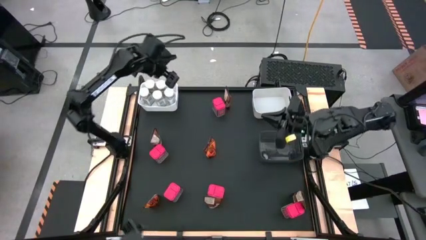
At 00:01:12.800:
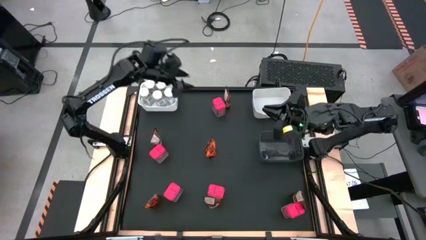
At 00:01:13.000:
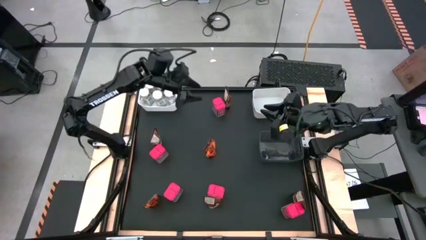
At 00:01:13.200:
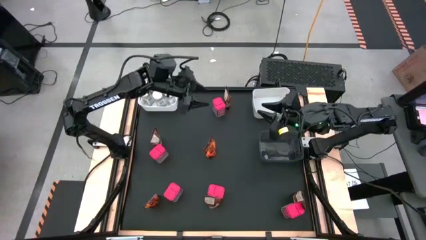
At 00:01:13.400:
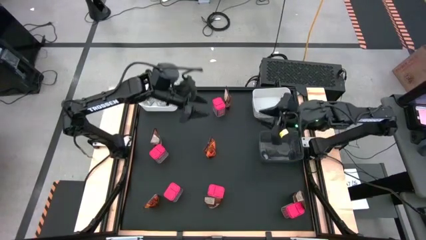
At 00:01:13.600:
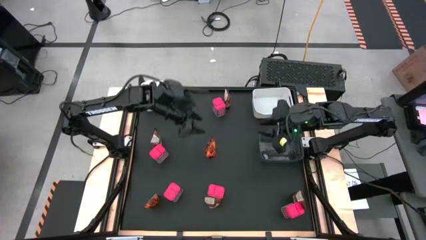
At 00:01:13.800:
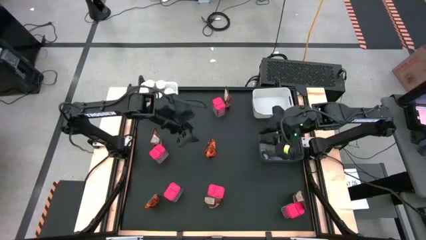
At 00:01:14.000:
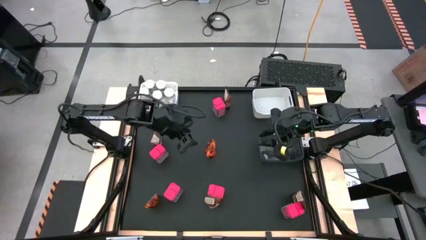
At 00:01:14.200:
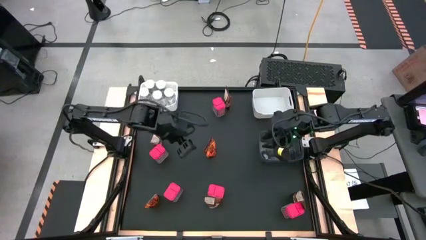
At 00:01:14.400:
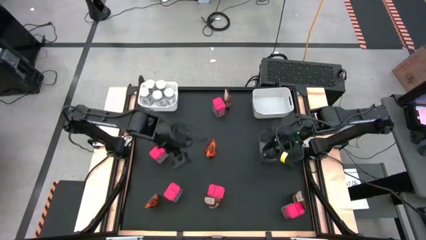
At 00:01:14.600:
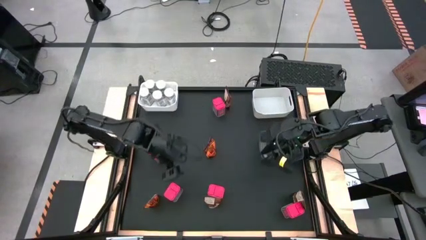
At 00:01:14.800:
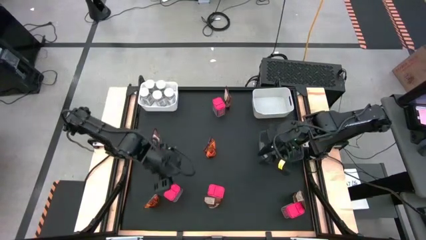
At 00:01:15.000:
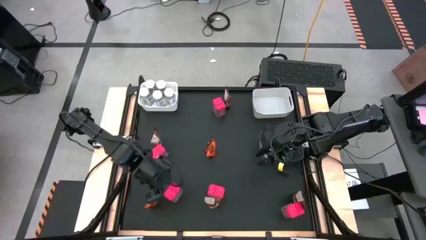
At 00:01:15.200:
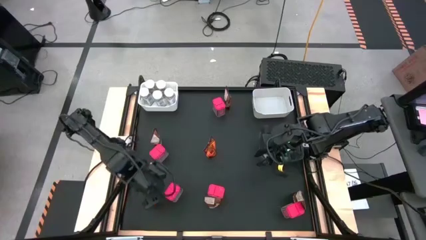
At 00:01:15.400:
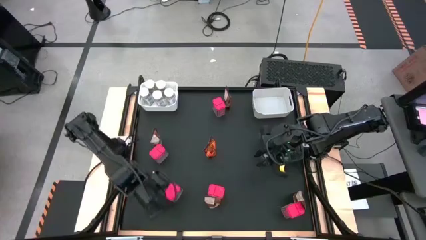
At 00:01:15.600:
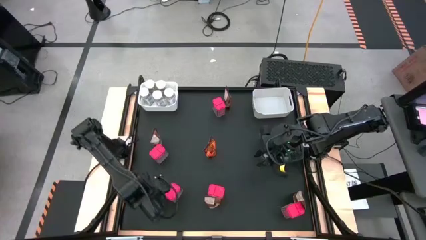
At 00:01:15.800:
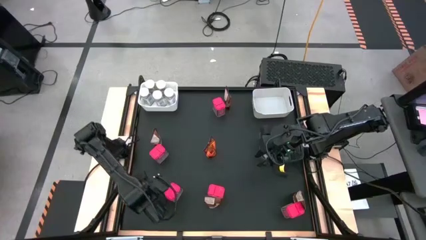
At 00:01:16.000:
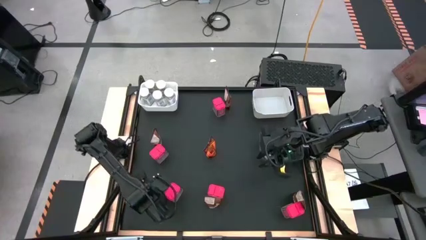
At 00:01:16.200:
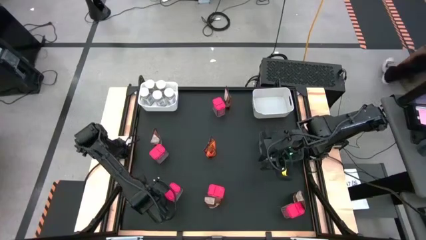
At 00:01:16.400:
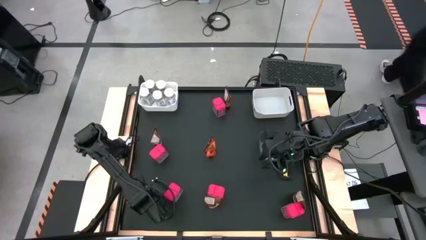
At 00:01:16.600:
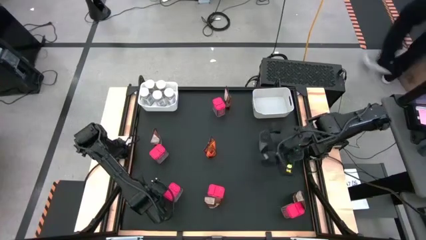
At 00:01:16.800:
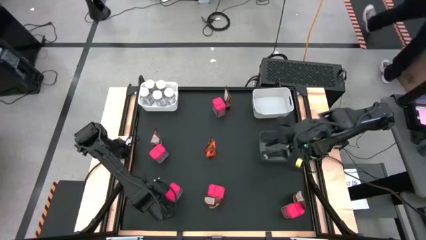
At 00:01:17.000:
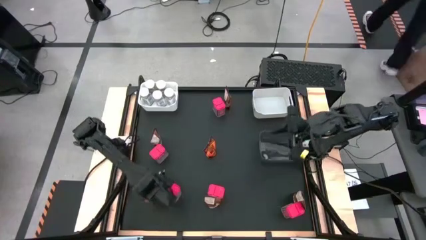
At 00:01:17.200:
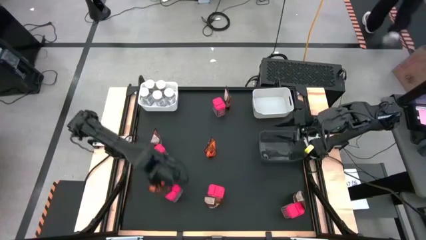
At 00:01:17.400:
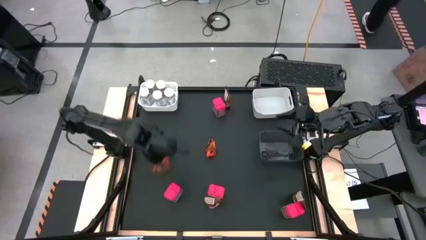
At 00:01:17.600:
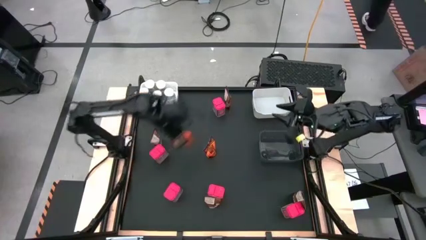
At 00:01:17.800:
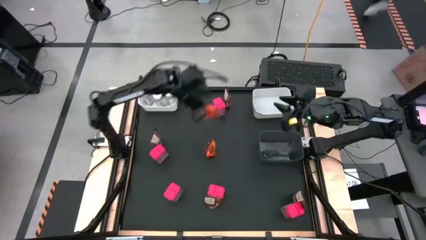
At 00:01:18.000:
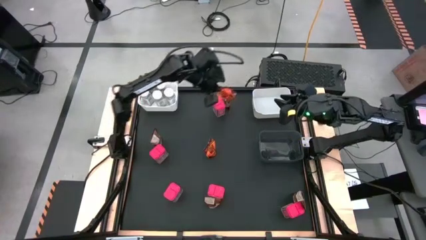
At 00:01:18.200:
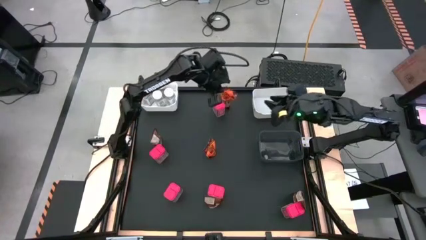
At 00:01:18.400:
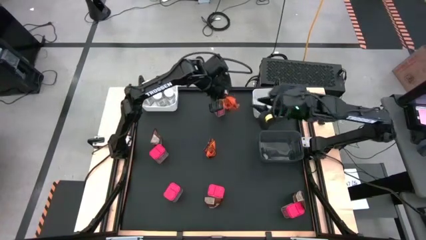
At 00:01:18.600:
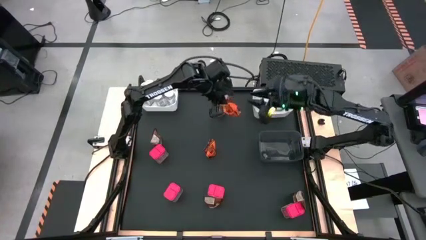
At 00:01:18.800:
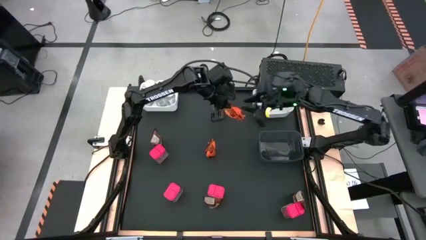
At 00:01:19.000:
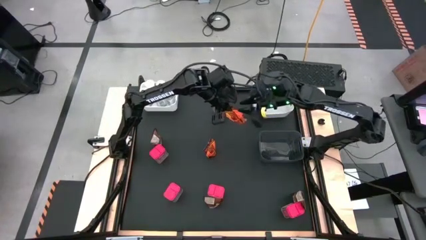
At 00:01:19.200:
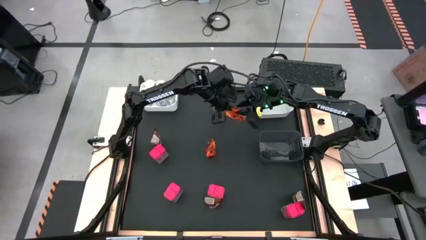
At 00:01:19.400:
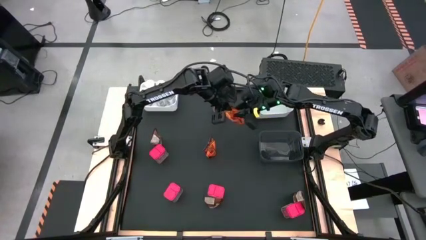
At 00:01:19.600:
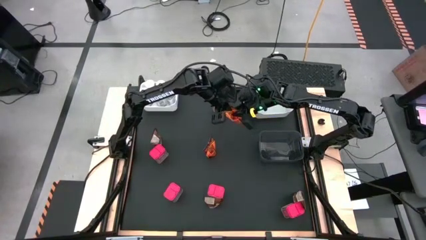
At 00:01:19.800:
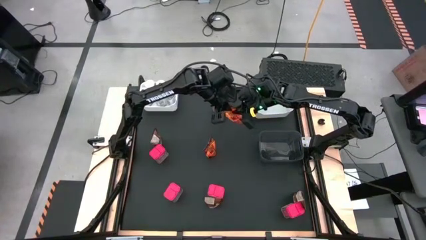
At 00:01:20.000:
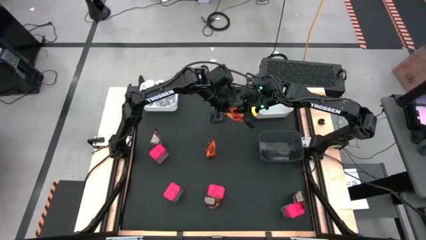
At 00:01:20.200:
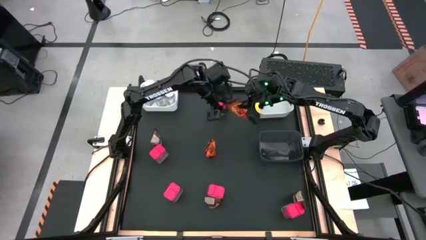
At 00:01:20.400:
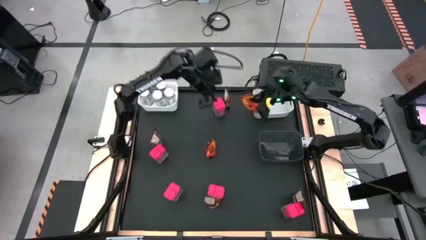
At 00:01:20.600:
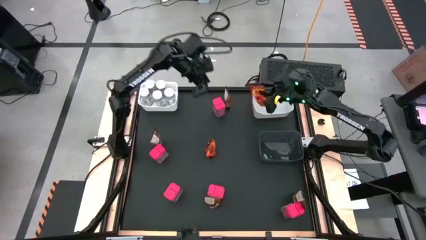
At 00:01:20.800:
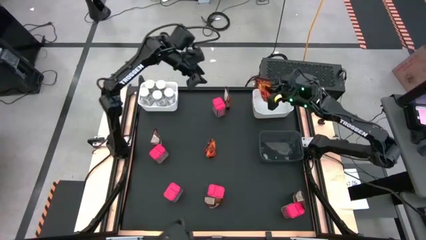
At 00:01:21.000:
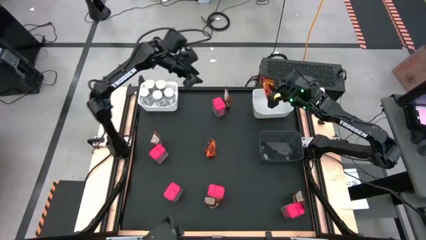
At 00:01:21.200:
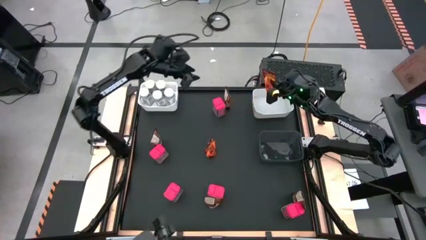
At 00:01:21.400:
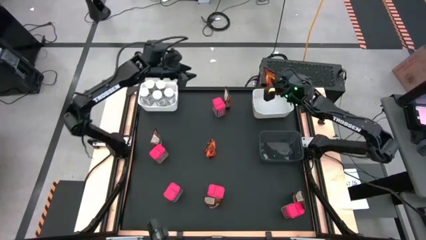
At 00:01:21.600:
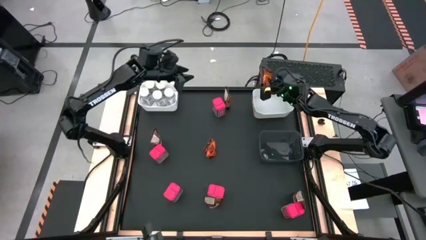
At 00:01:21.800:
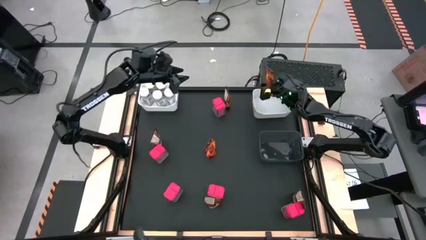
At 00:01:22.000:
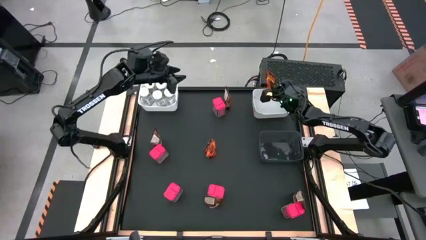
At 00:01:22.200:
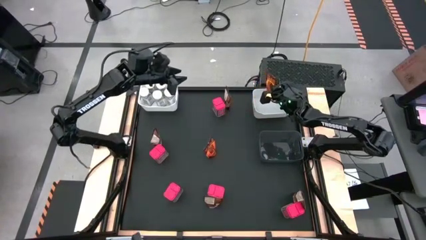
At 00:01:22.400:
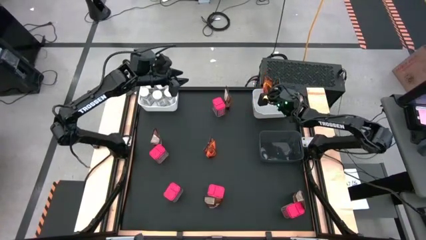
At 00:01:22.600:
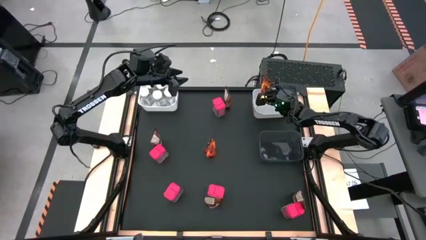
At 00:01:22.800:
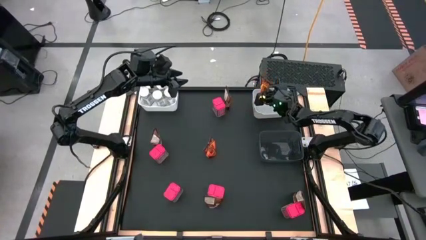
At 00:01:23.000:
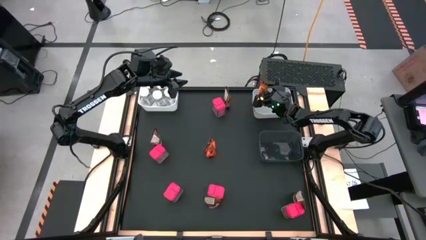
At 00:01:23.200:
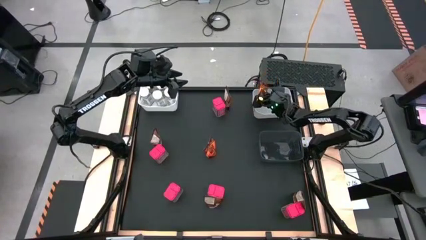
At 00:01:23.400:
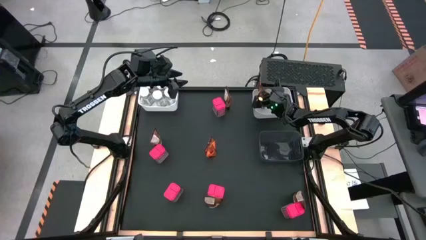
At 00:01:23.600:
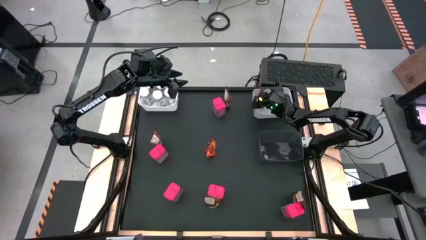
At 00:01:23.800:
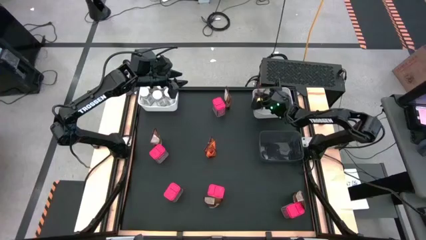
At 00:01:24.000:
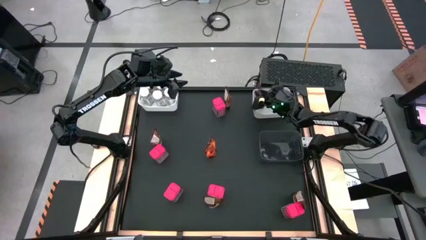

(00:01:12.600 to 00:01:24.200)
Task: Sort spices by type
Put the orange seasoning bag into the right white bin
